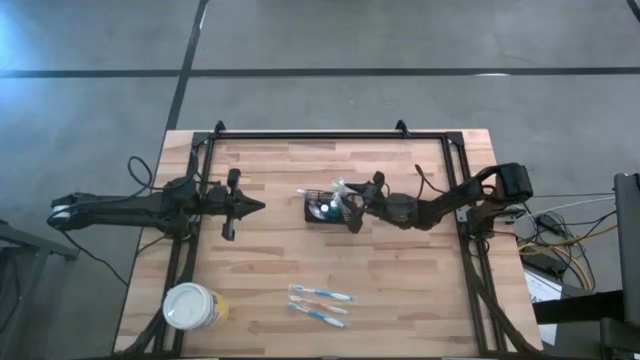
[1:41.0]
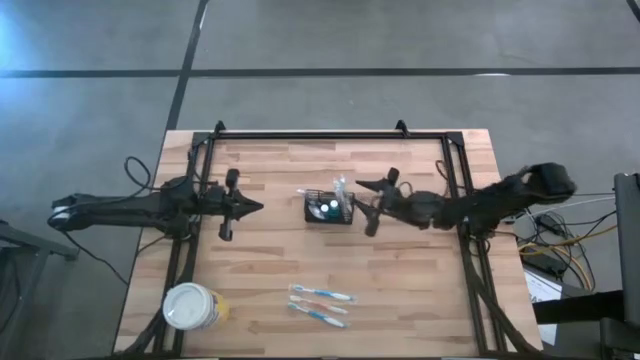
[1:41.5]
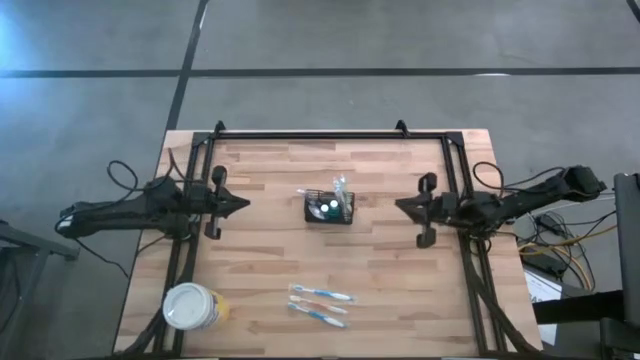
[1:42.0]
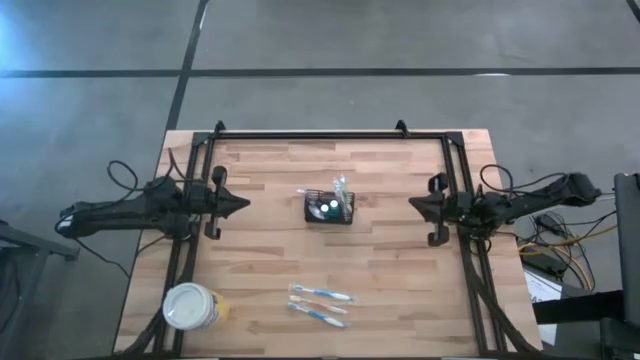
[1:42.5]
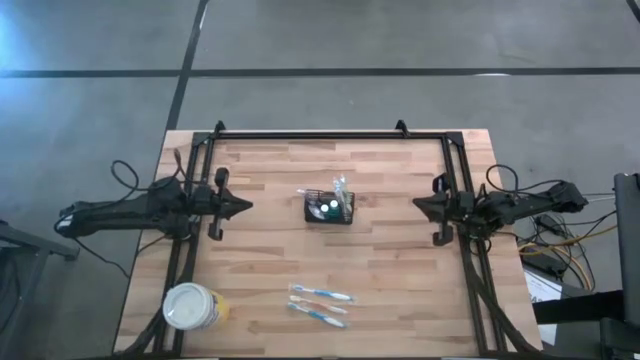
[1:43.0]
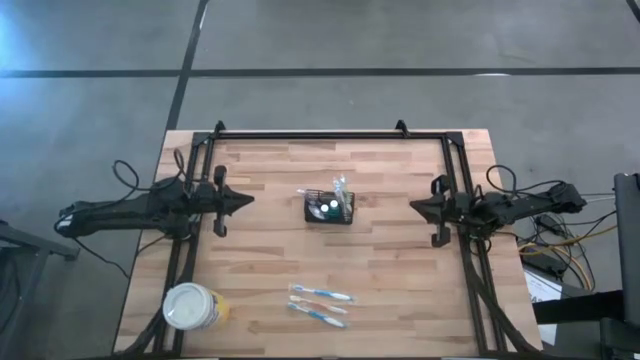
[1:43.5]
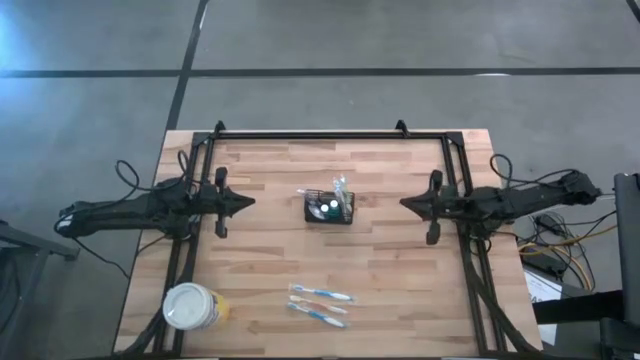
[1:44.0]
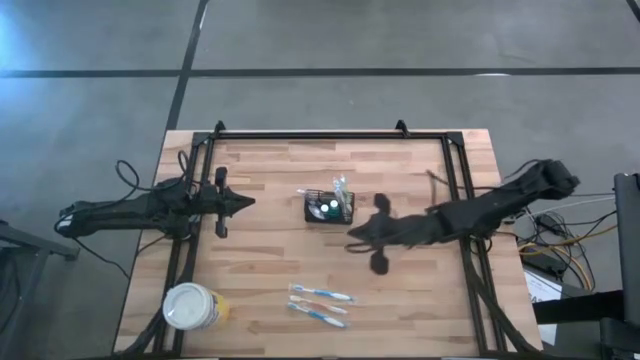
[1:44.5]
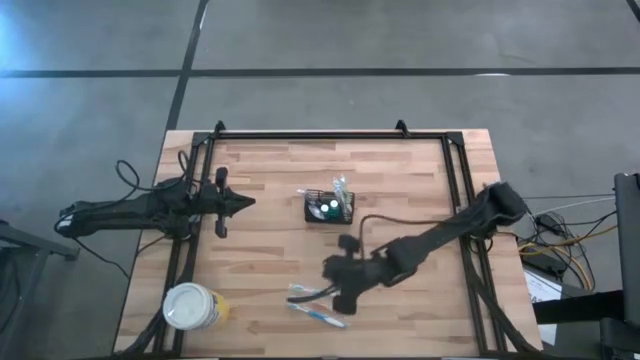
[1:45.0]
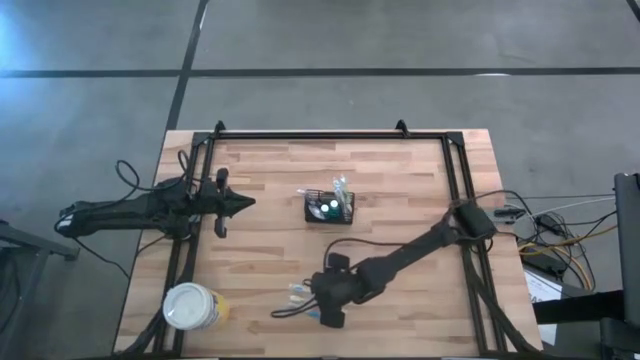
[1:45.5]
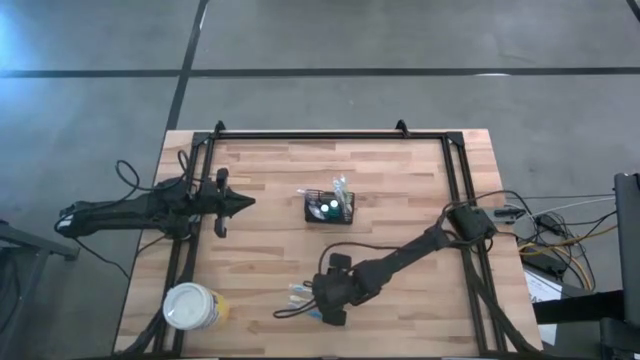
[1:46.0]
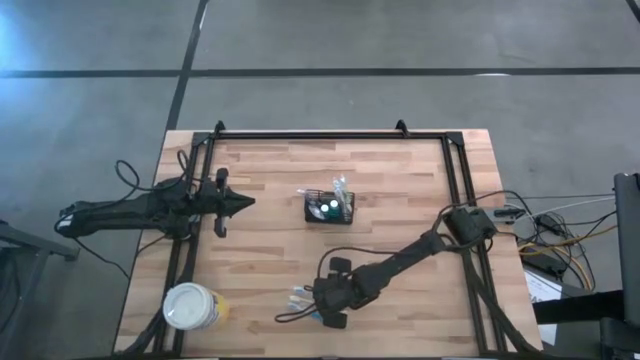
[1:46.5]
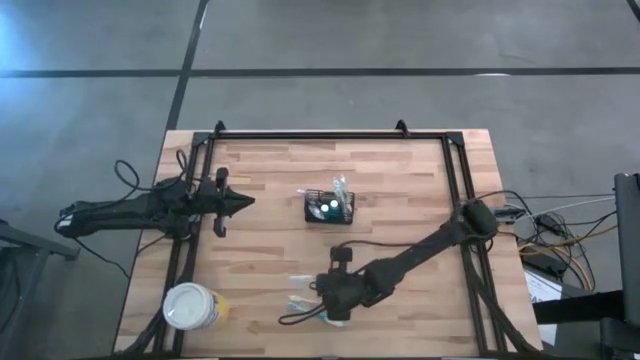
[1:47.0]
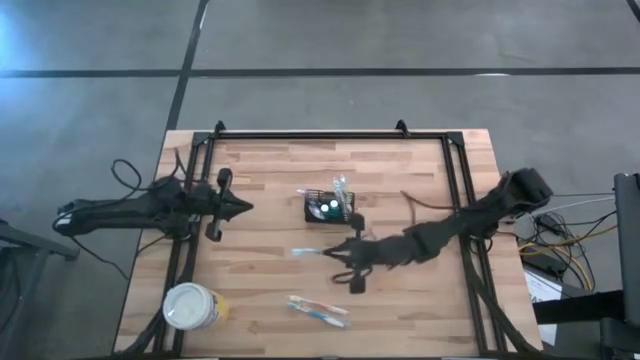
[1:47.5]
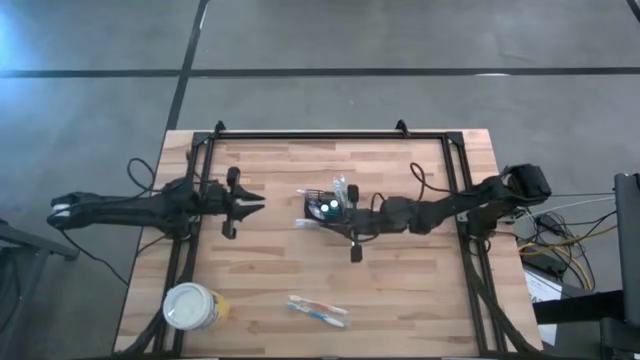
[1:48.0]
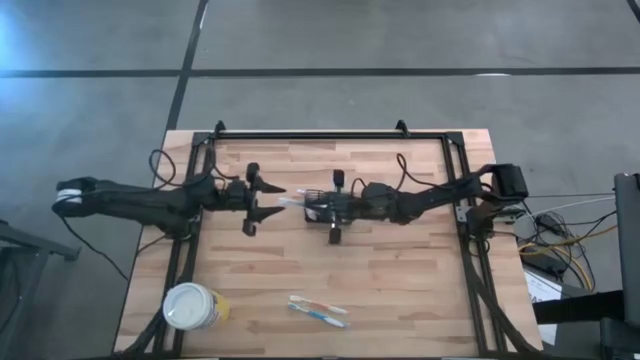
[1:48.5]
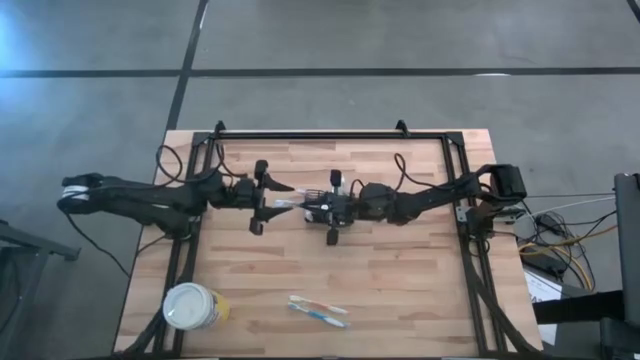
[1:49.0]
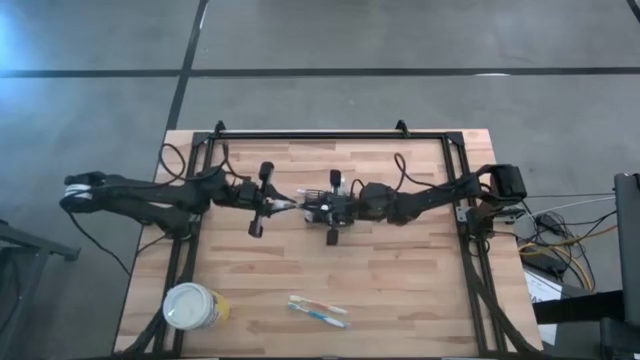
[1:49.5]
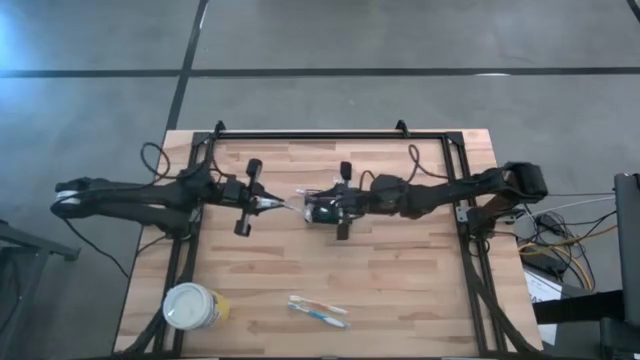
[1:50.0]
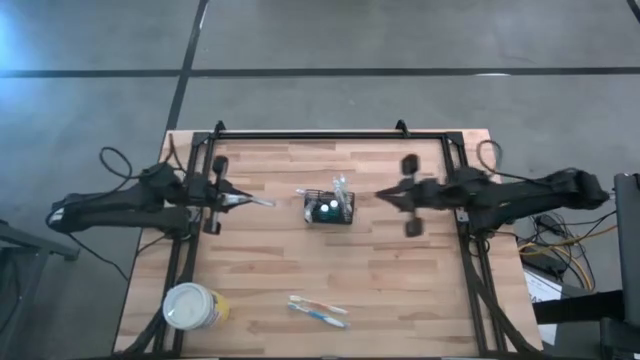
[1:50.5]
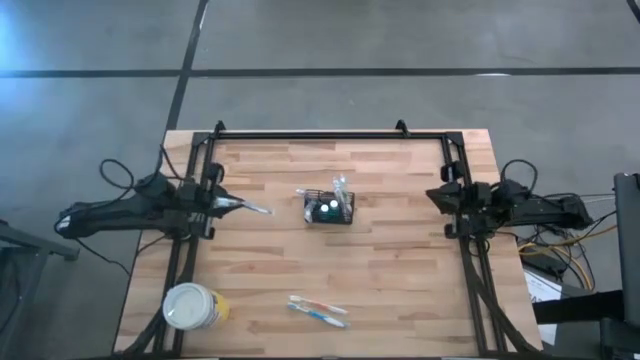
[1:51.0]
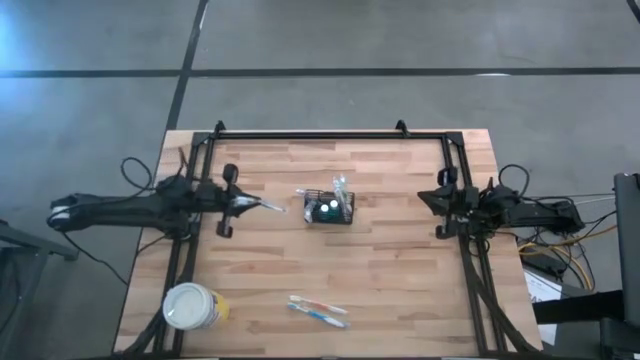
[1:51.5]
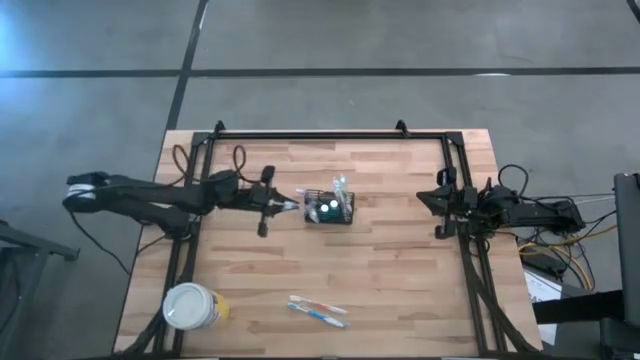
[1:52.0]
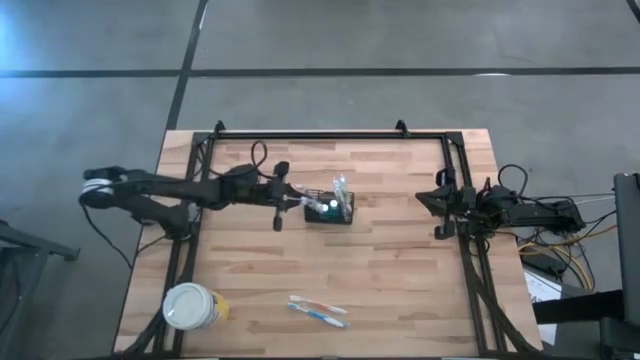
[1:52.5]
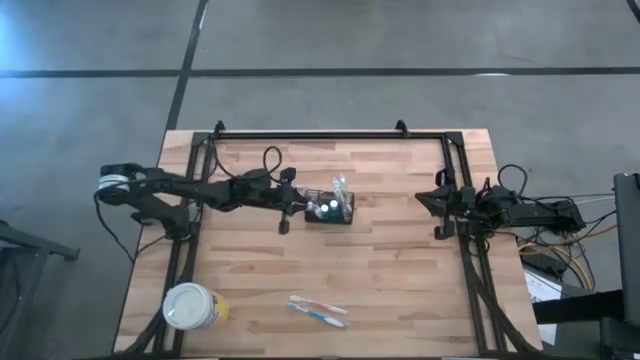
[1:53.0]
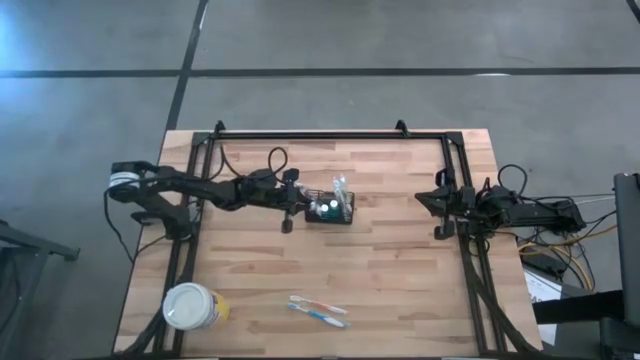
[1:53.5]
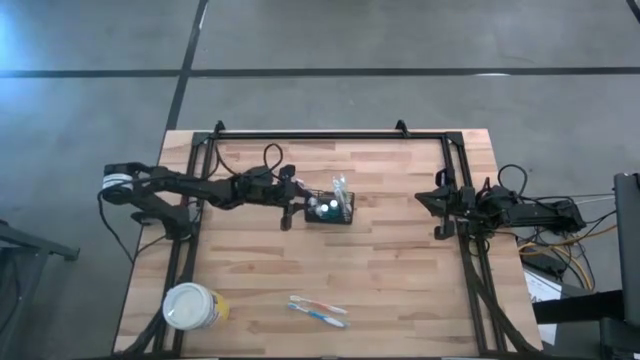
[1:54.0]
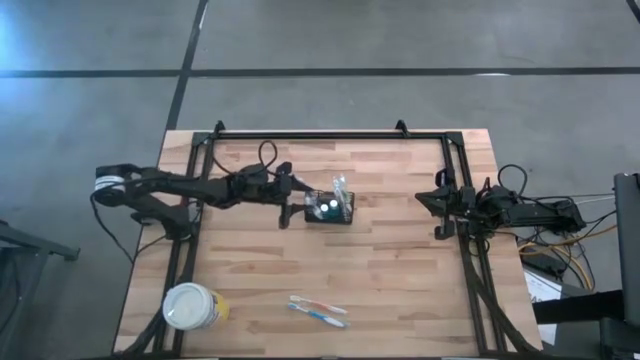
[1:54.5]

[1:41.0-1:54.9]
Task: Pick & Place toothbrushing station
Put the top blue toothbrush into the black organizer

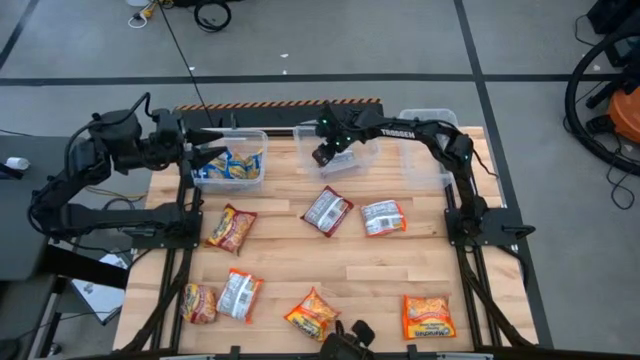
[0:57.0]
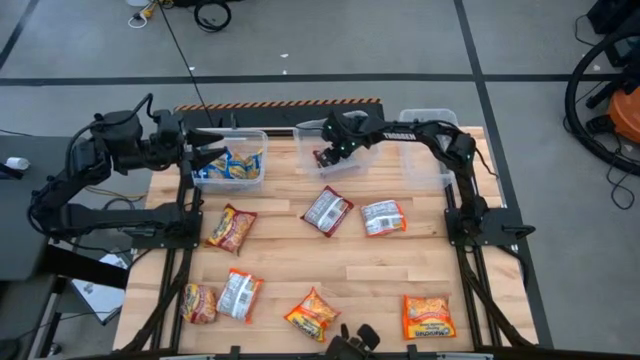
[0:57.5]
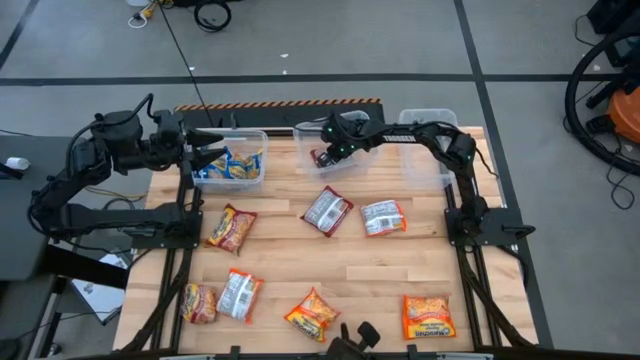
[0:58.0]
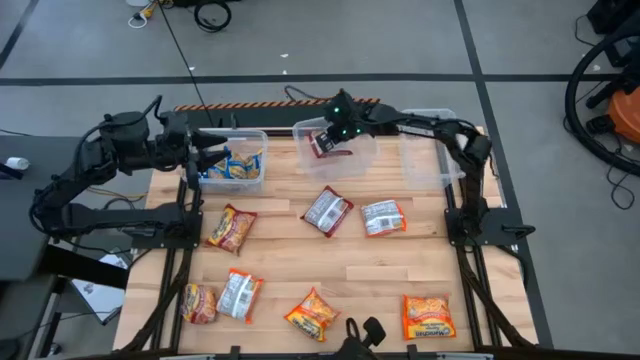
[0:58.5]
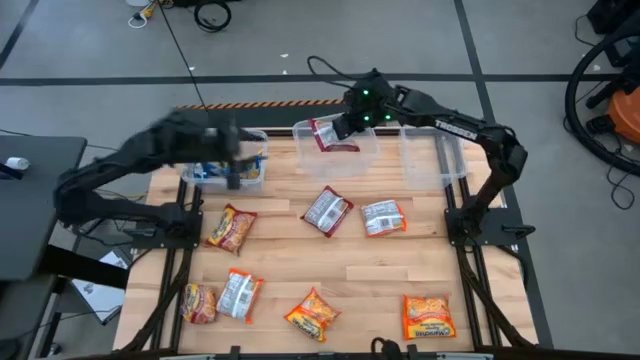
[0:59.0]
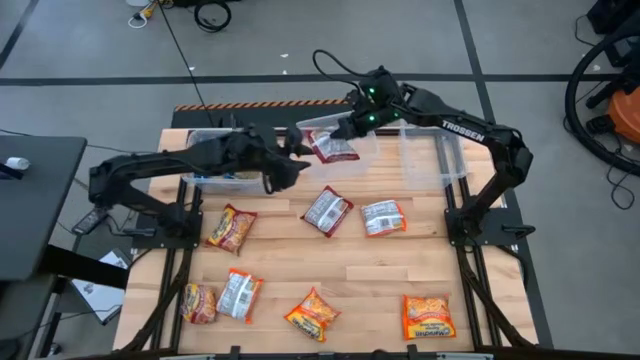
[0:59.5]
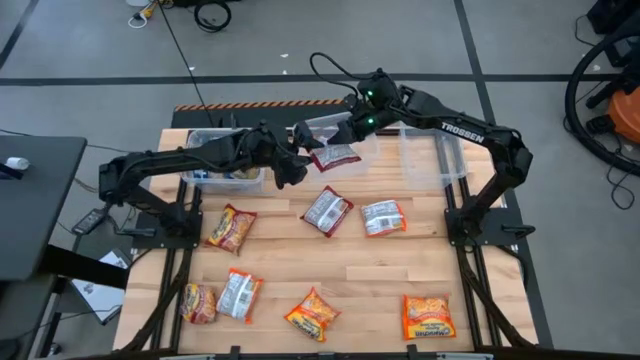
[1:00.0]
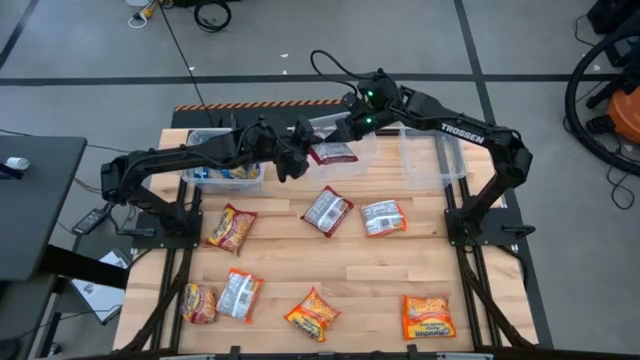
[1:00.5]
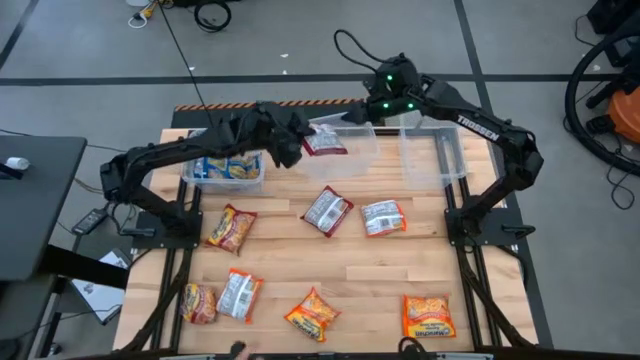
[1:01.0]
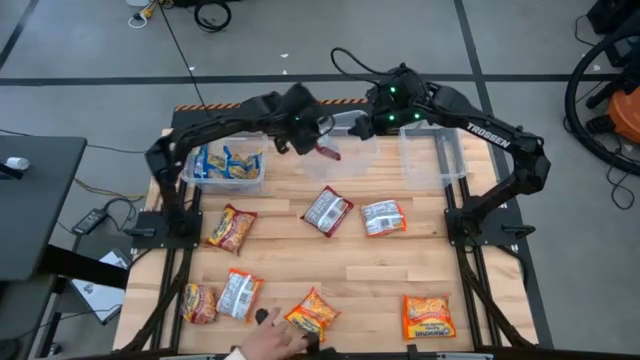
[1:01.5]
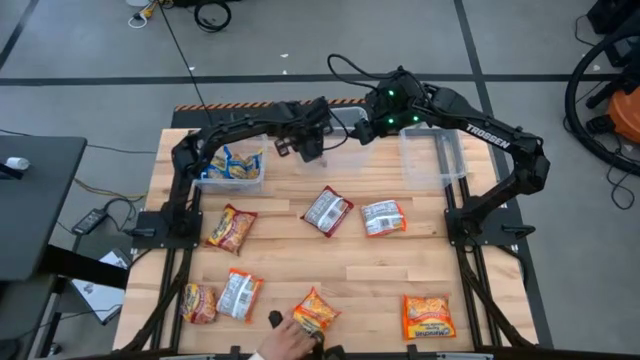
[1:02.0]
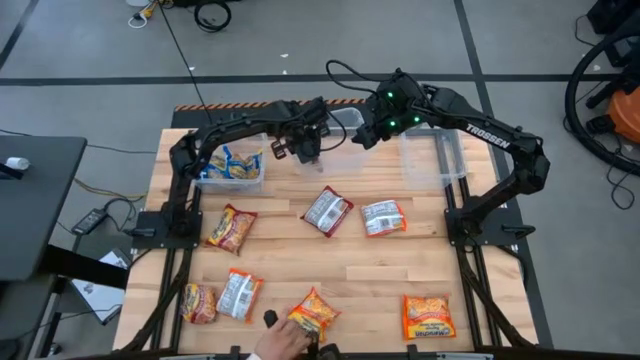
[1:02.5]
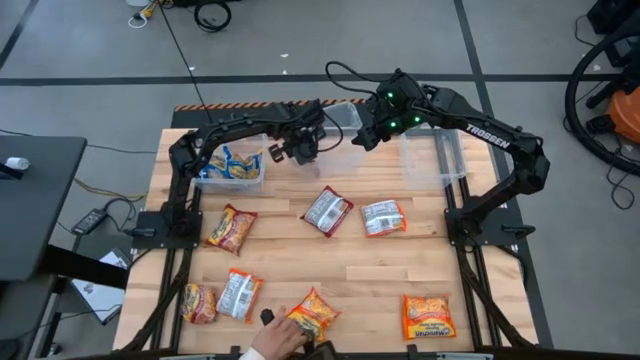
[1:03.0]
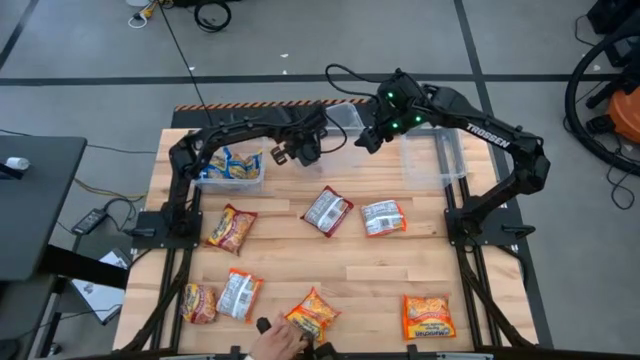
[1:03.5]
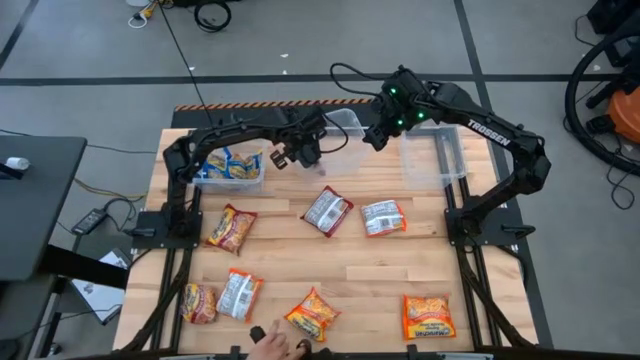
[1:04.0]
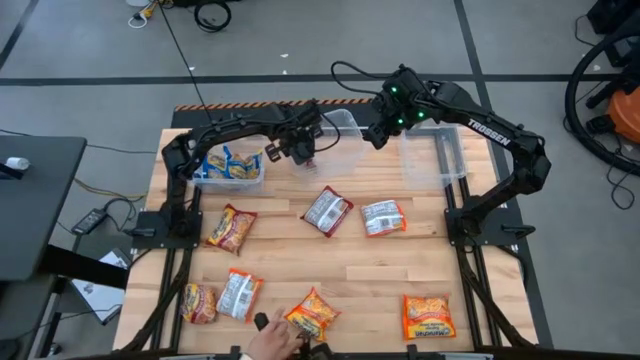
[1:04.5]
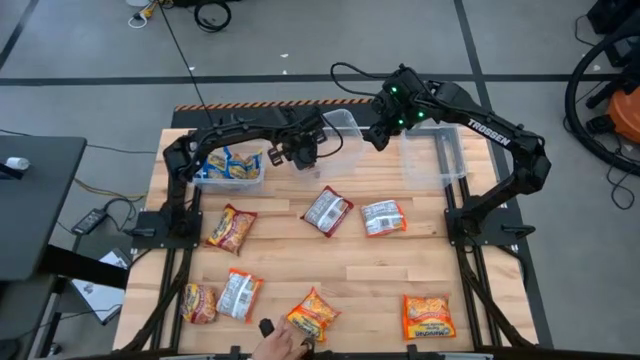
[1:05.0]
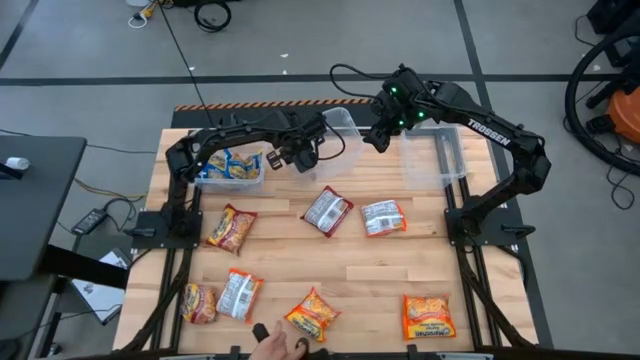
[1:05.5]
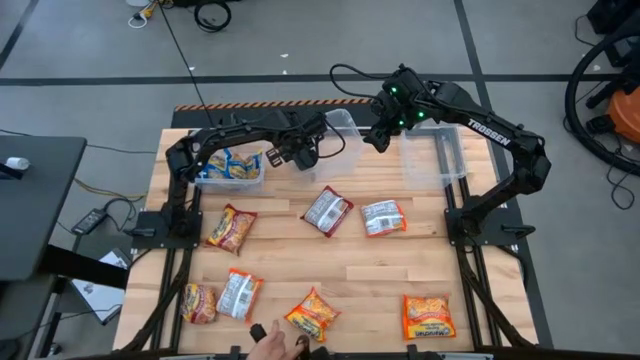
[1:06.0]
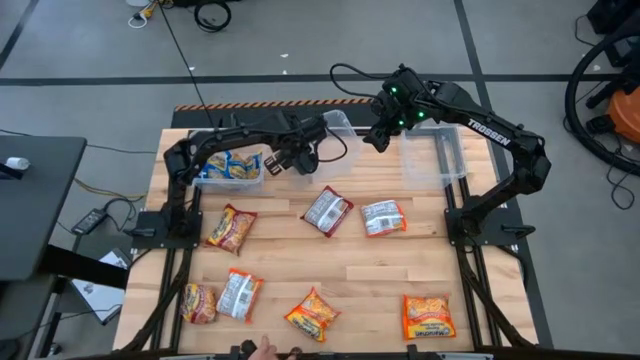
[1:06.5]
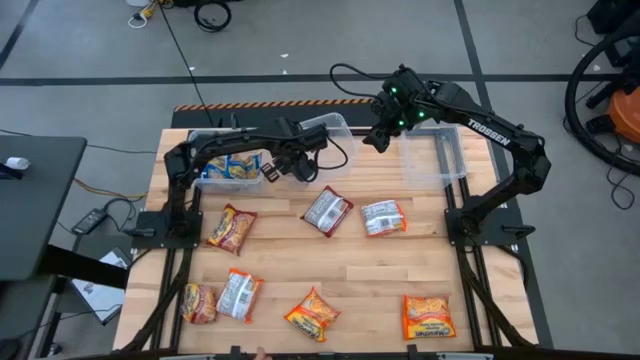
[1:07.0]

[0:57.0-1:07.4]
Task: Sort Maruchan noodles
Adjust the red noodle pack in the center transparent bin
